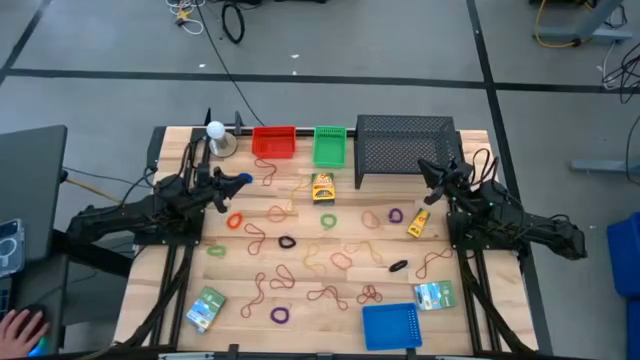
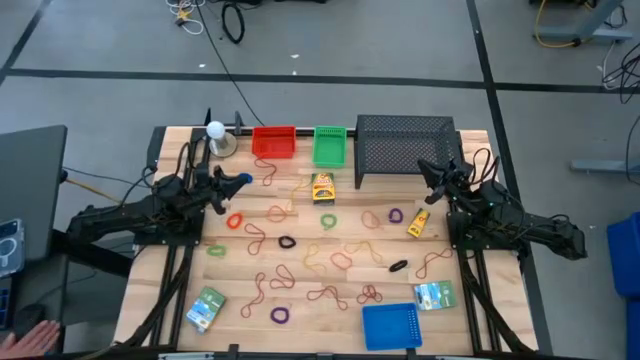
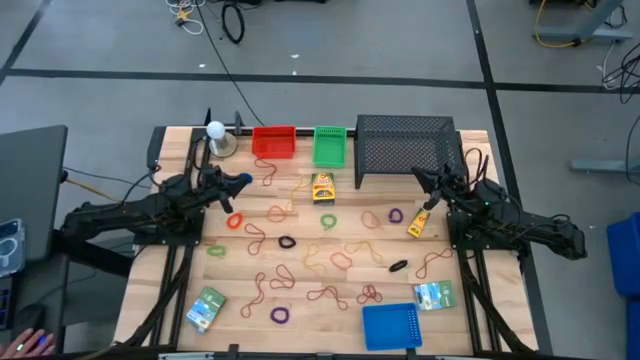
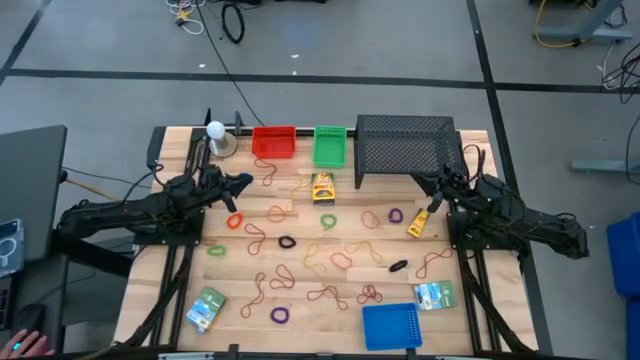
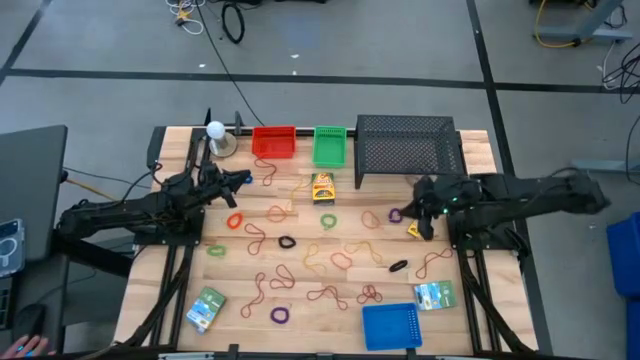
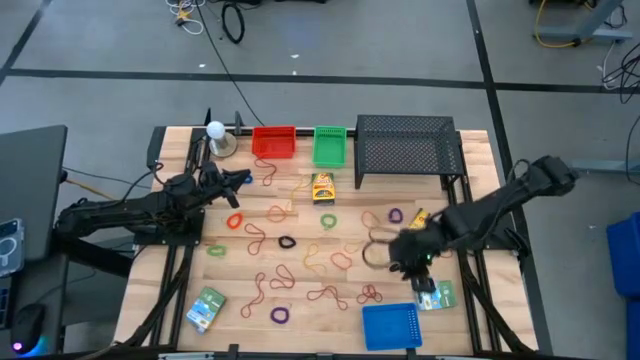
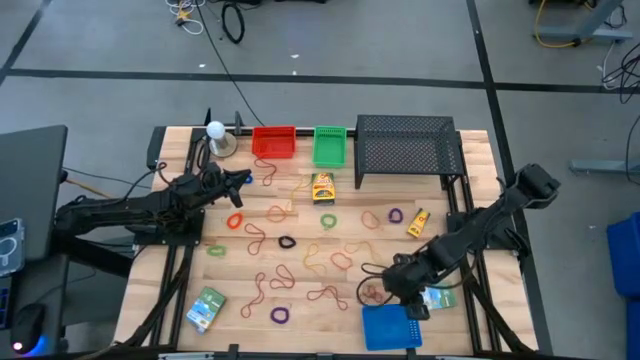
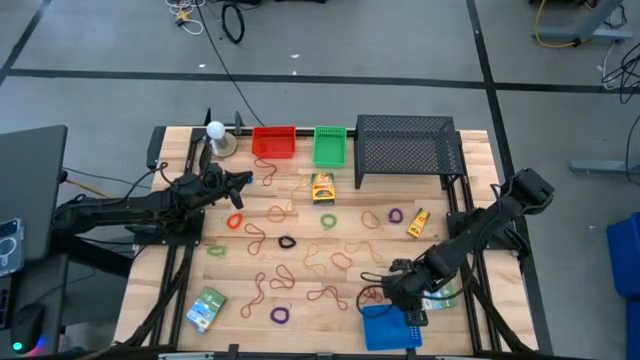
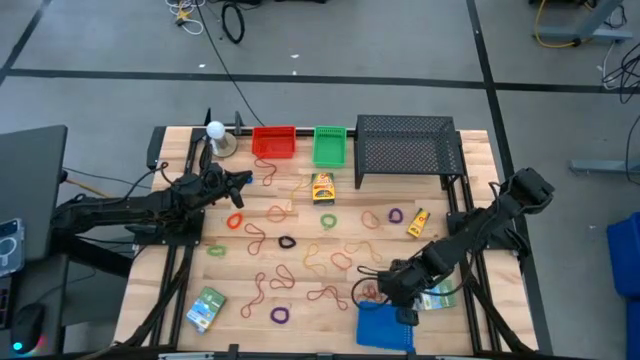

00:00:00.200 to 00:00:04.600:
Task: Pick & Place Office Desk Supplies
Put the blue bin on the shelf

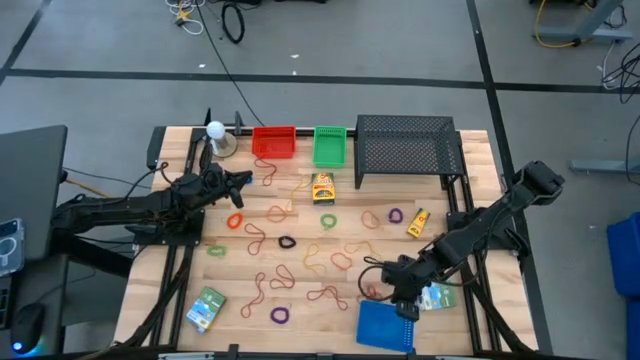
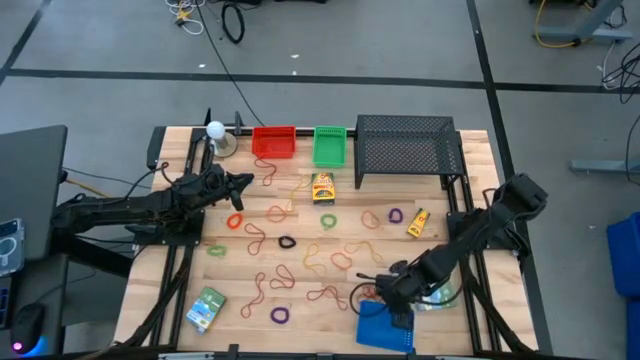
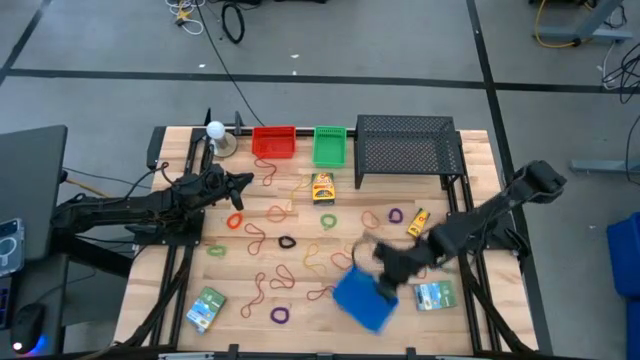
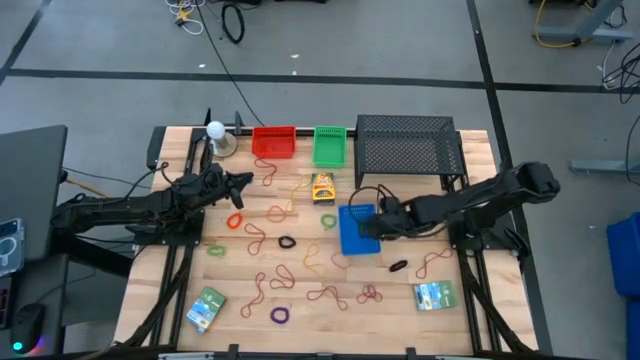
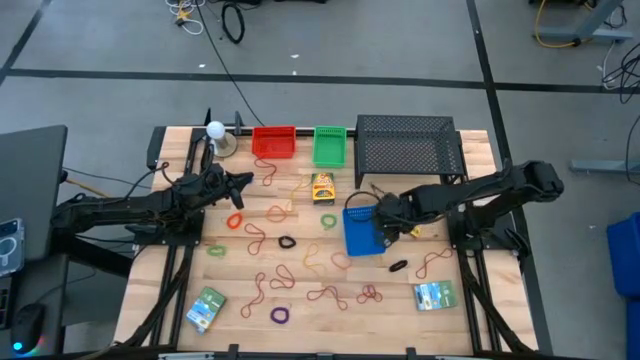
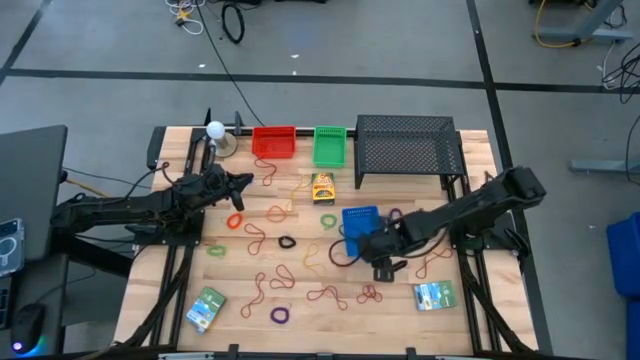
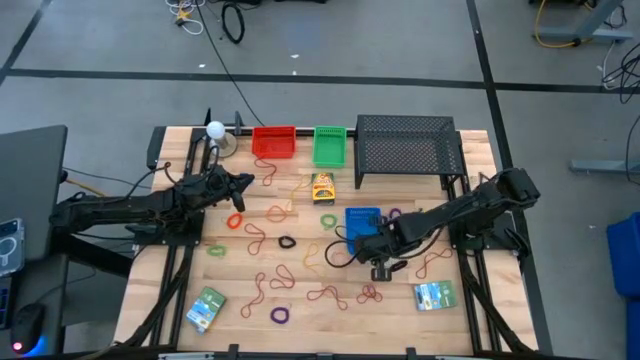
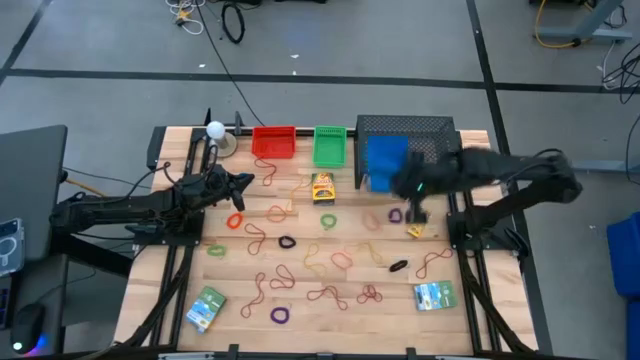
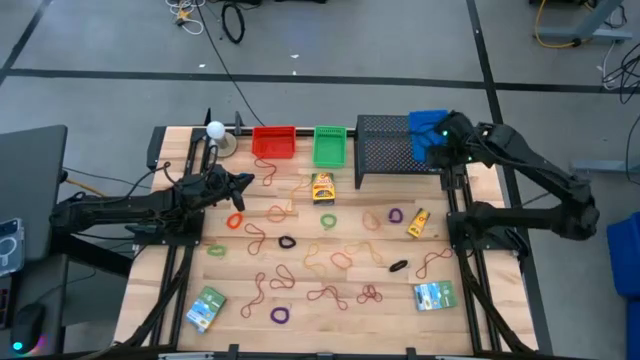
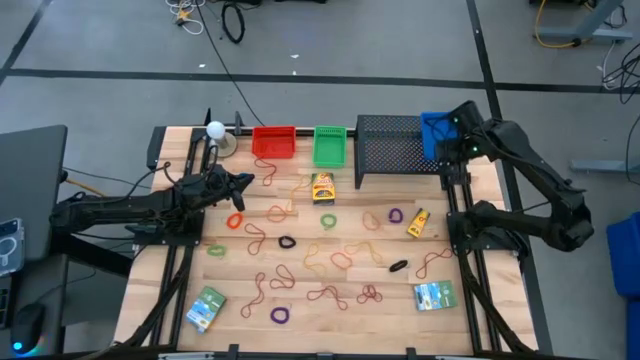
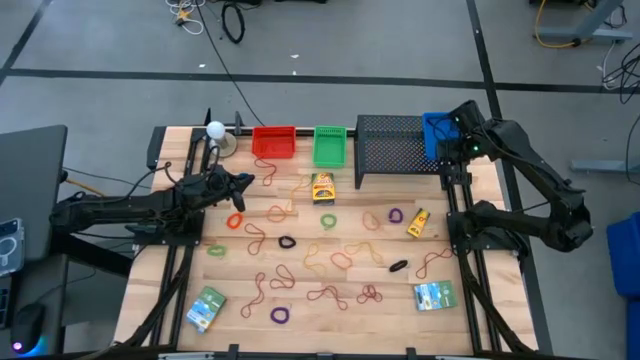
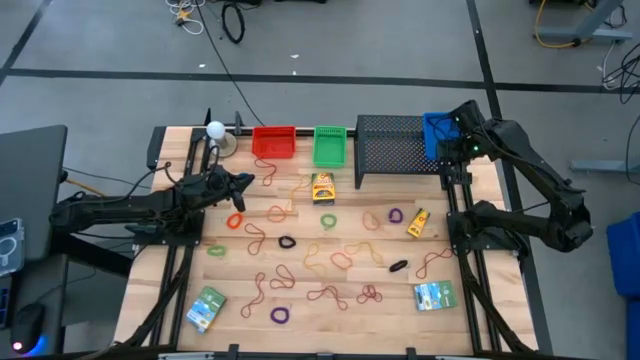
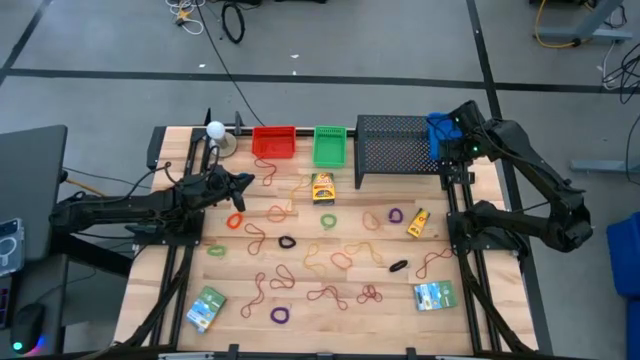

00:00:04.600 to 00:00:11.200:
Put the blue bin on the shelf

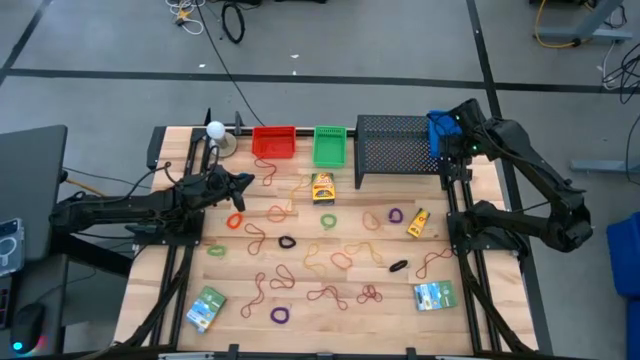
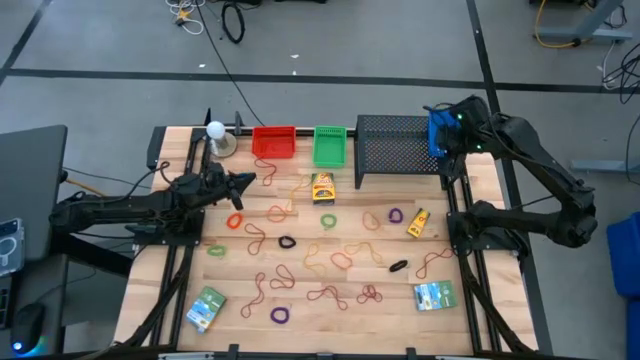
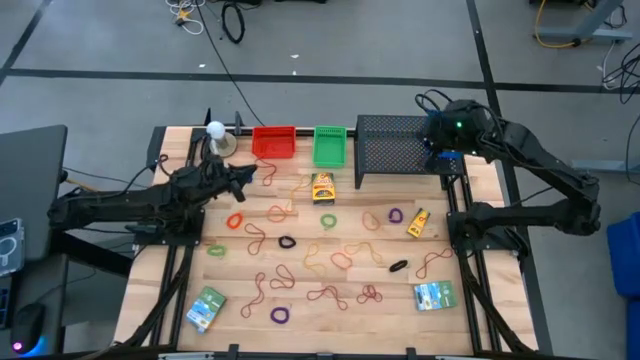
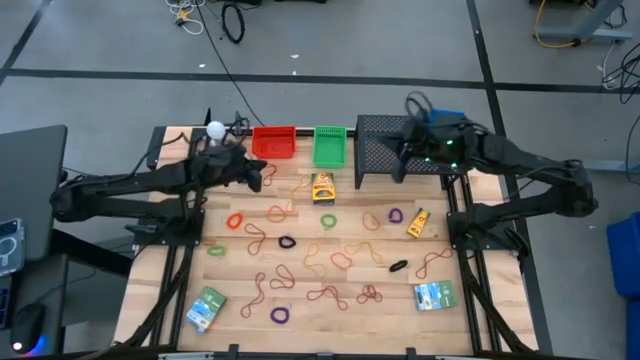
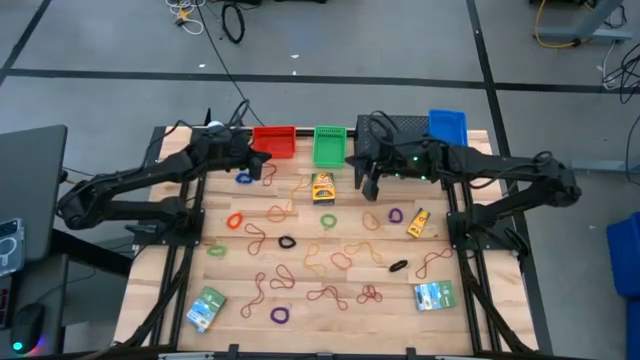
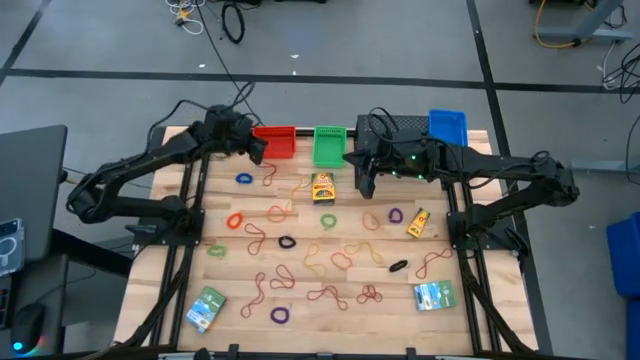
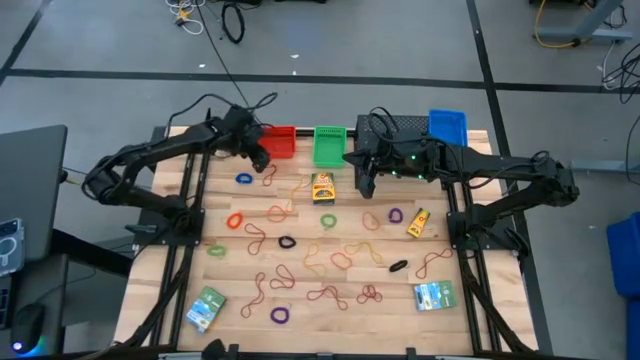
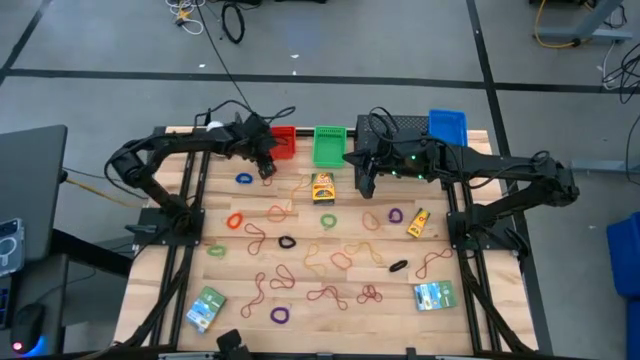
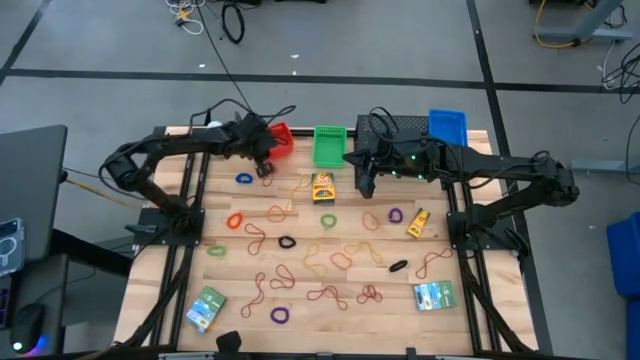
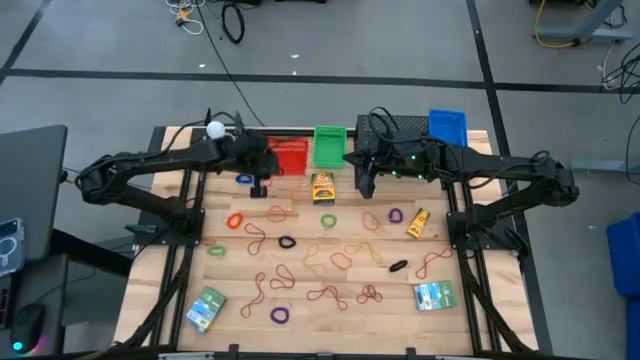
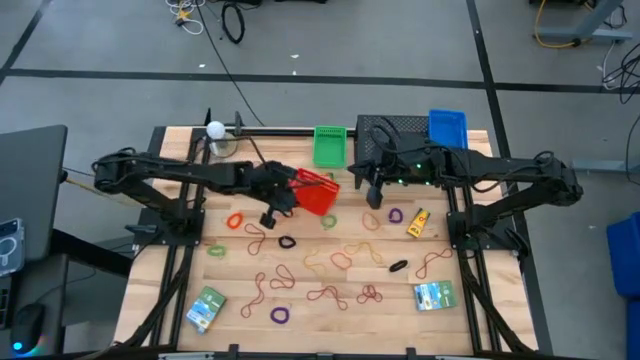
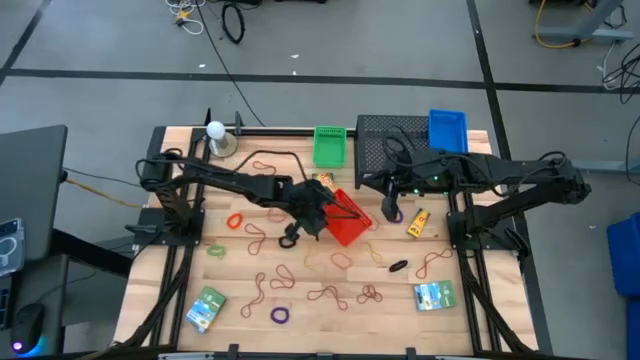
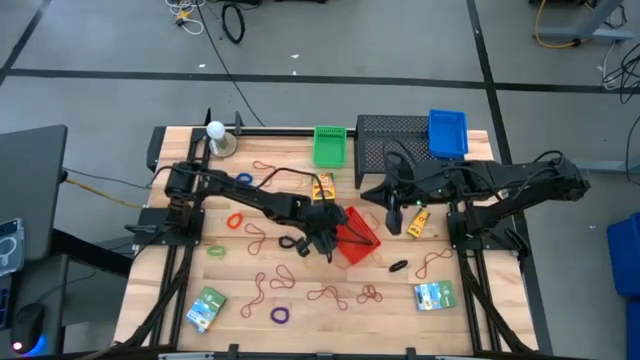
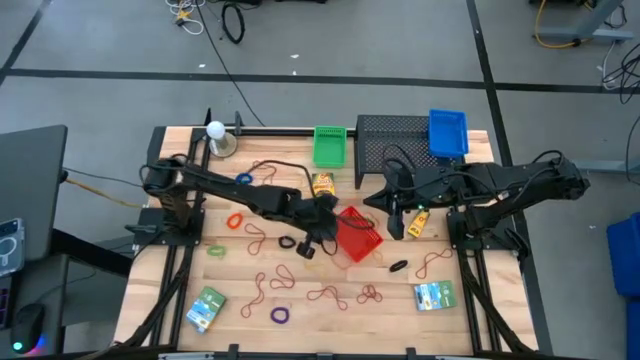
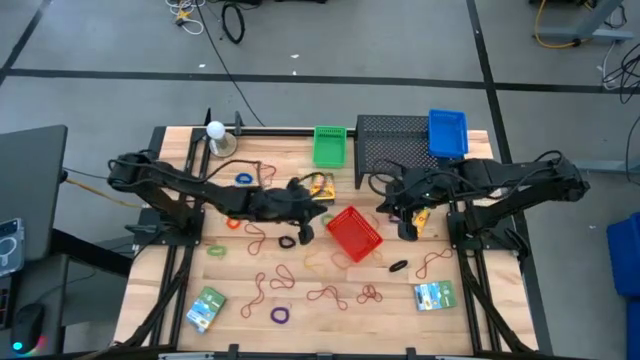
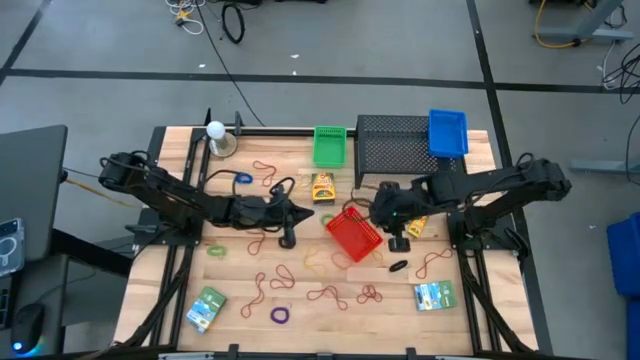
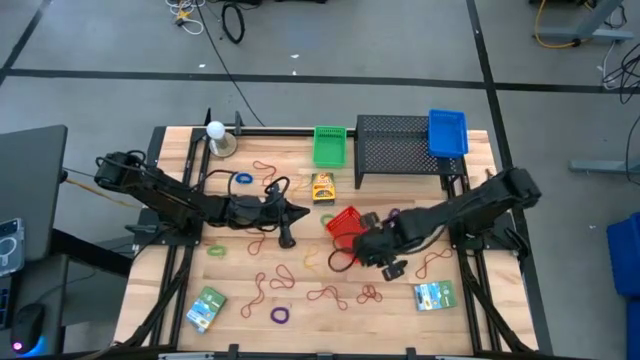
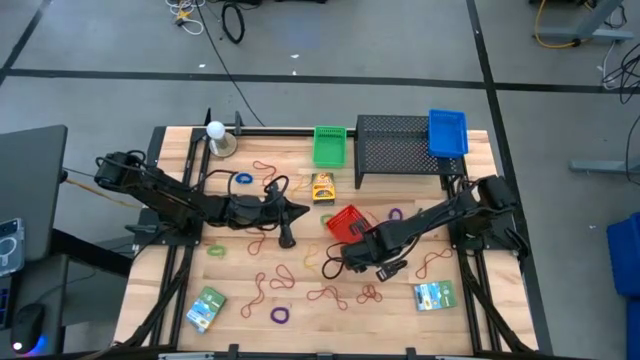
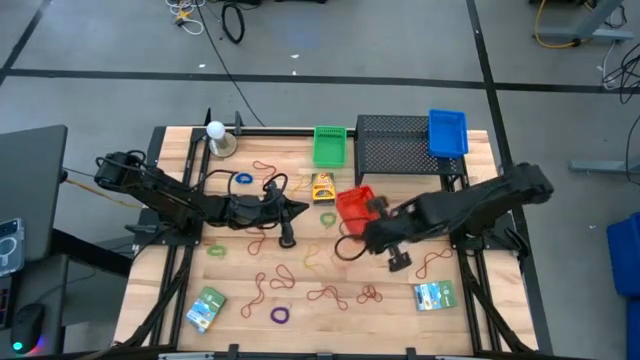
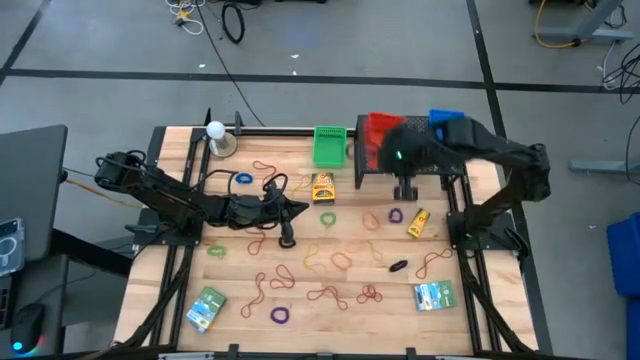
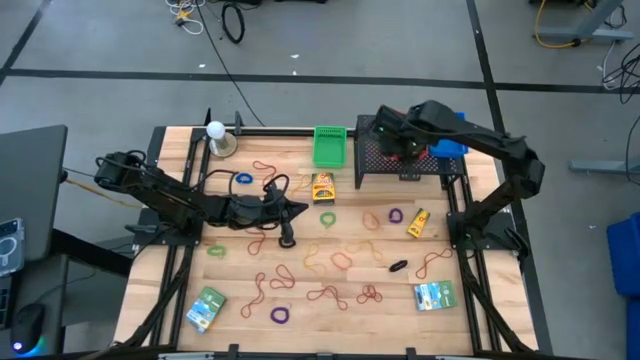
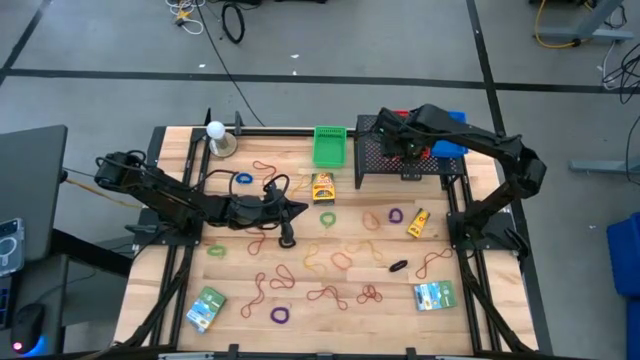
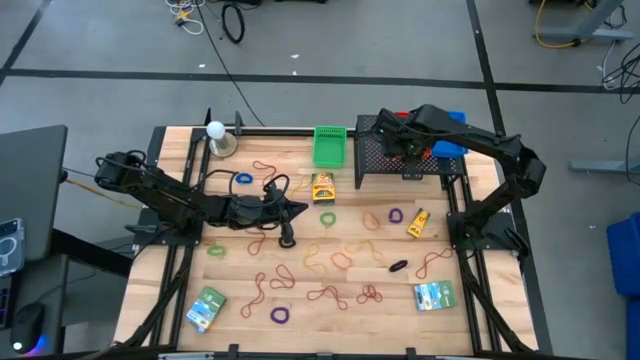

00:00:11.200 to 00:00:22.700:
Put the red bin on the shelf
